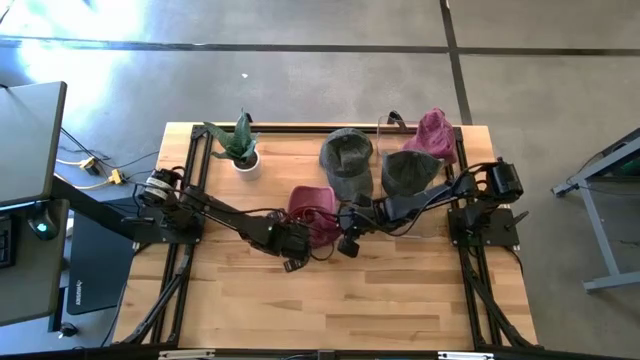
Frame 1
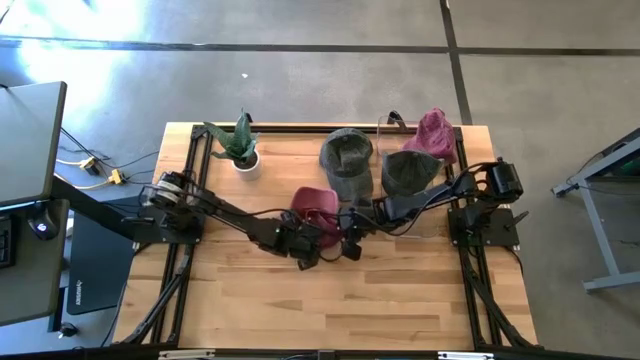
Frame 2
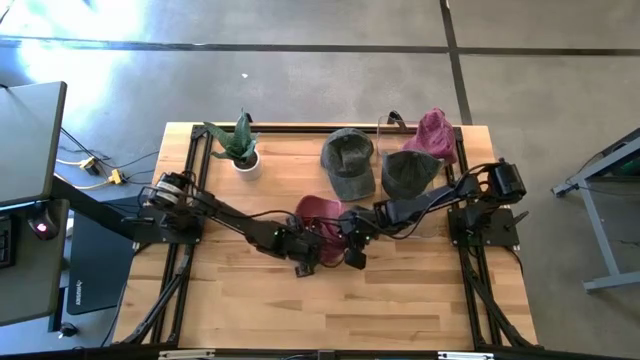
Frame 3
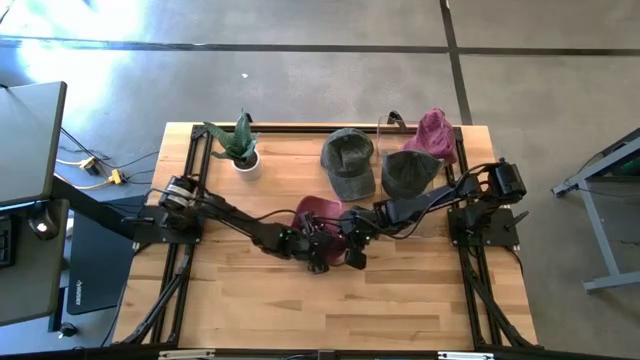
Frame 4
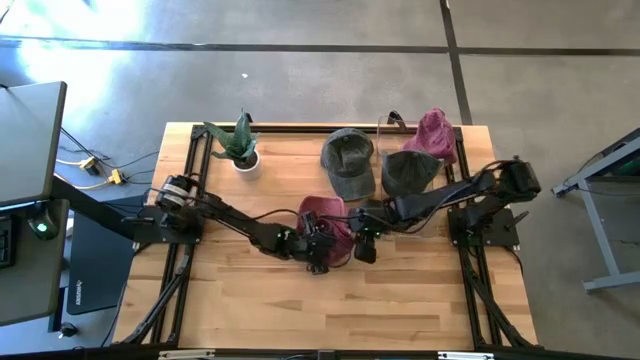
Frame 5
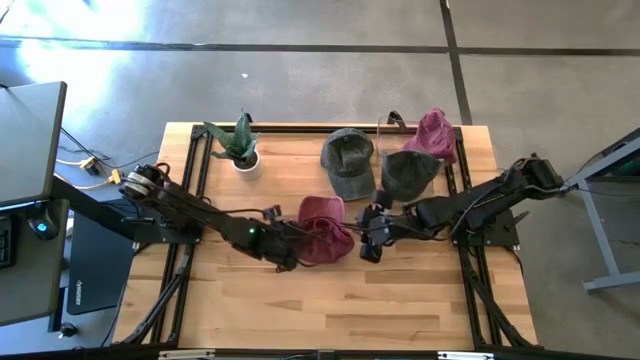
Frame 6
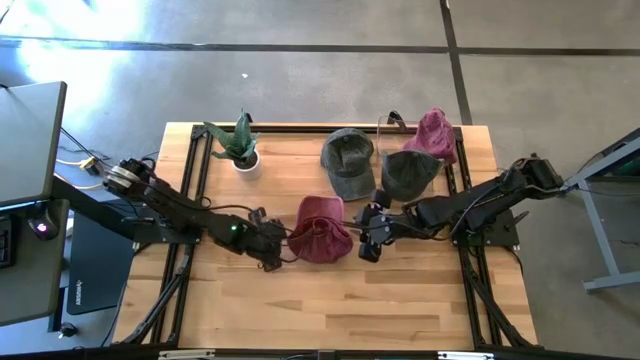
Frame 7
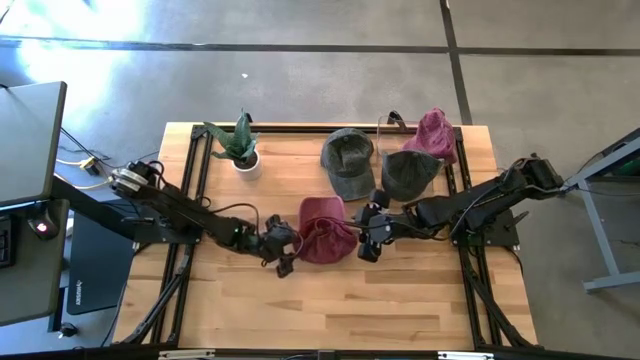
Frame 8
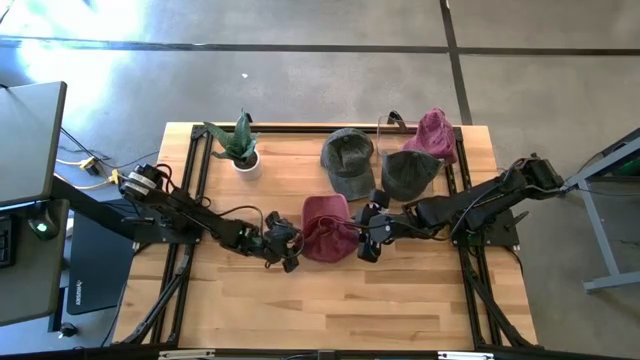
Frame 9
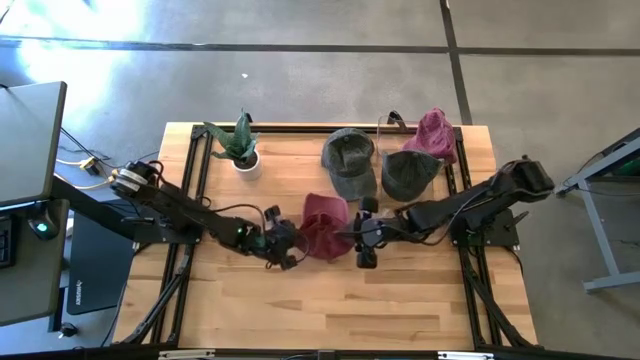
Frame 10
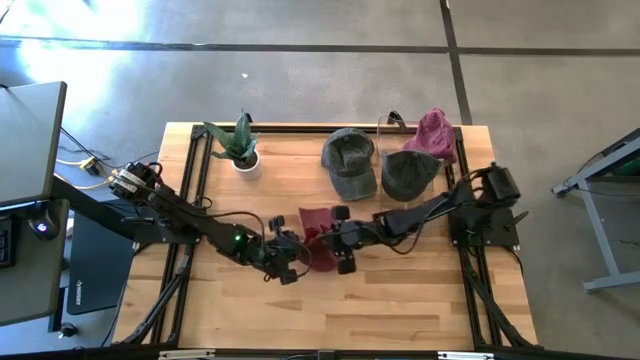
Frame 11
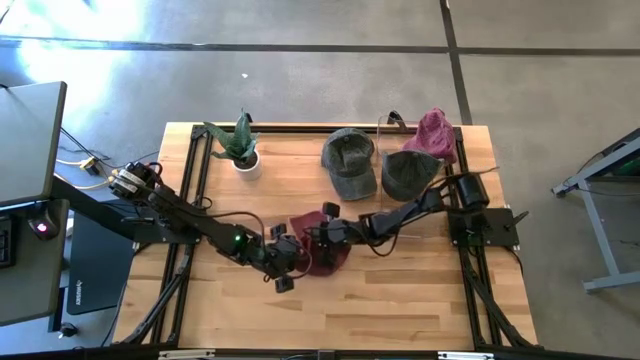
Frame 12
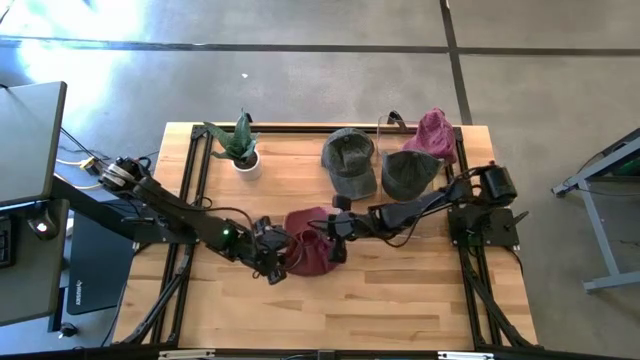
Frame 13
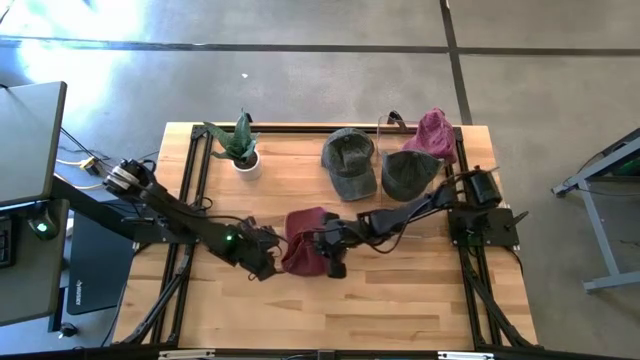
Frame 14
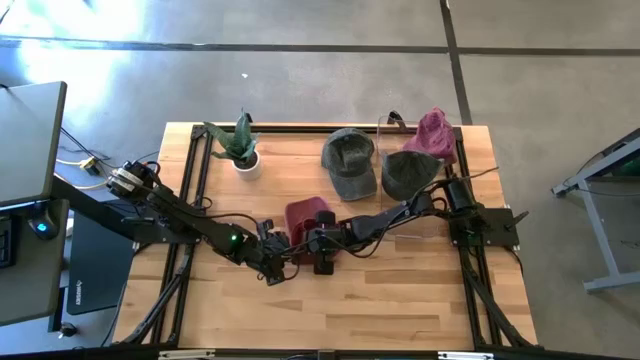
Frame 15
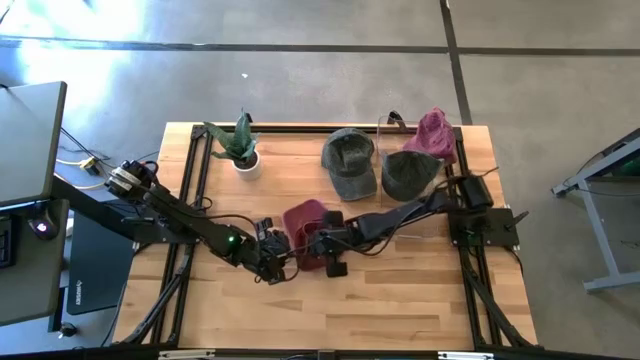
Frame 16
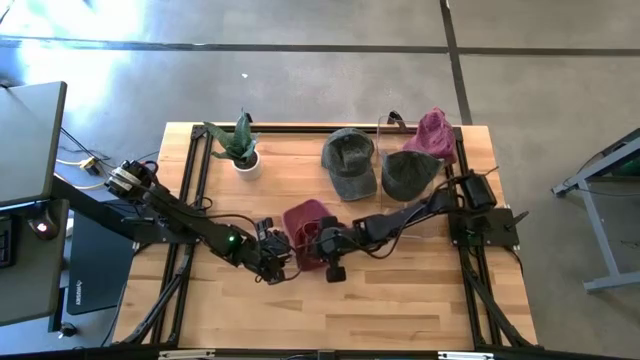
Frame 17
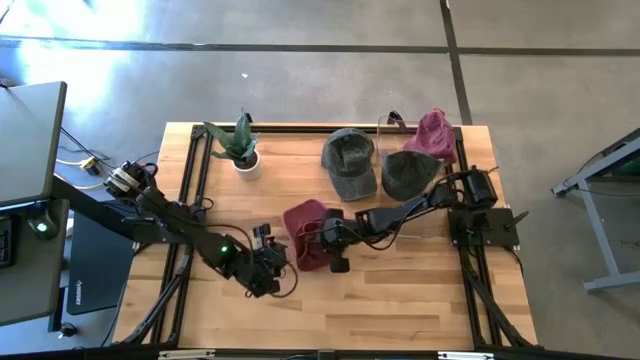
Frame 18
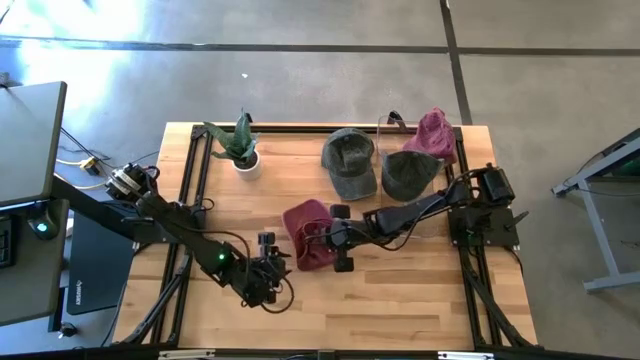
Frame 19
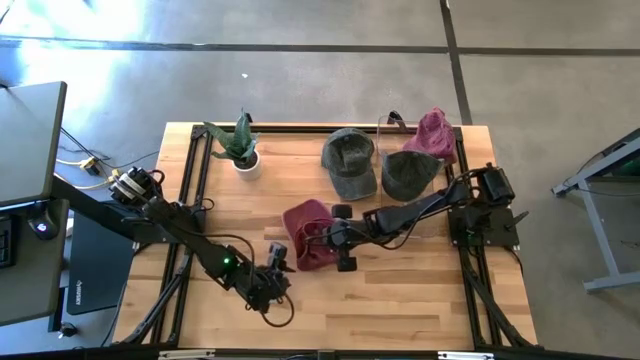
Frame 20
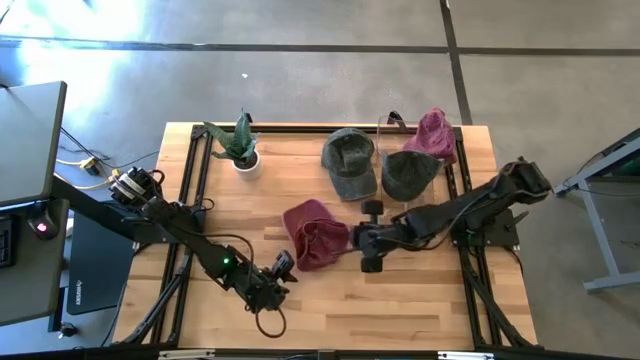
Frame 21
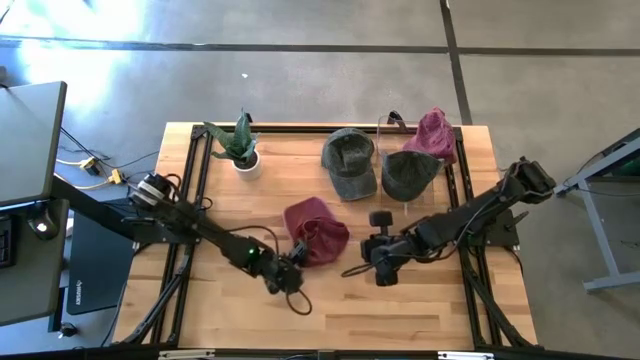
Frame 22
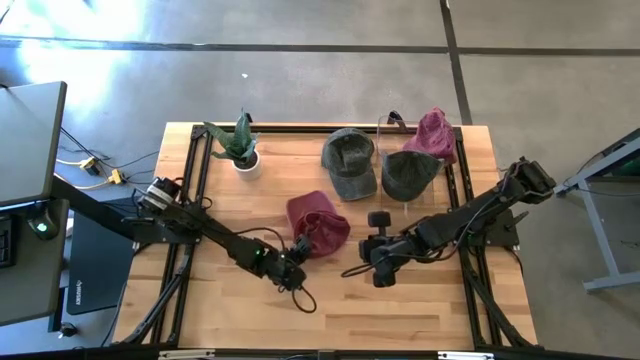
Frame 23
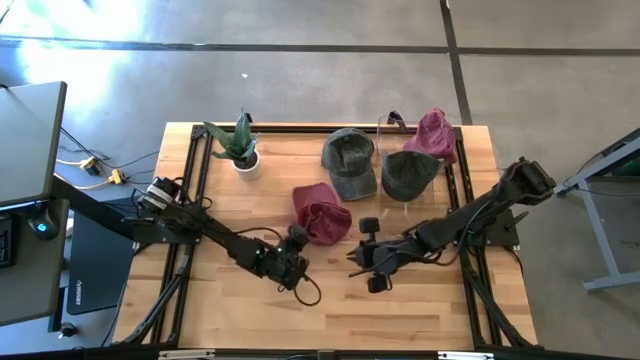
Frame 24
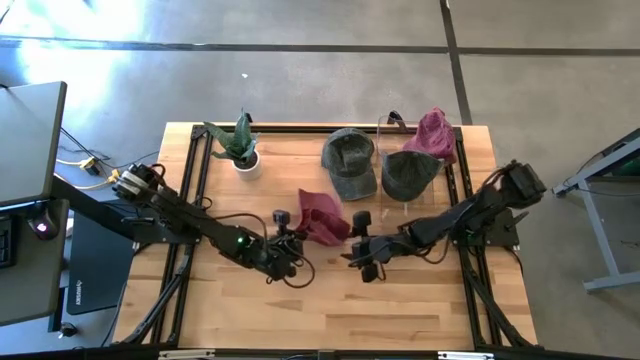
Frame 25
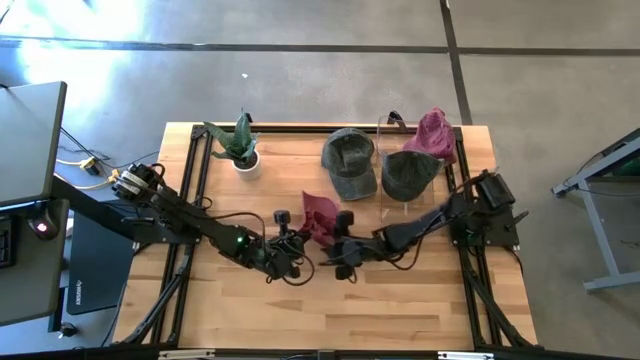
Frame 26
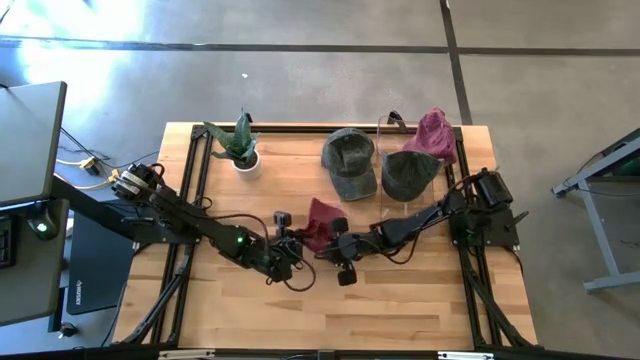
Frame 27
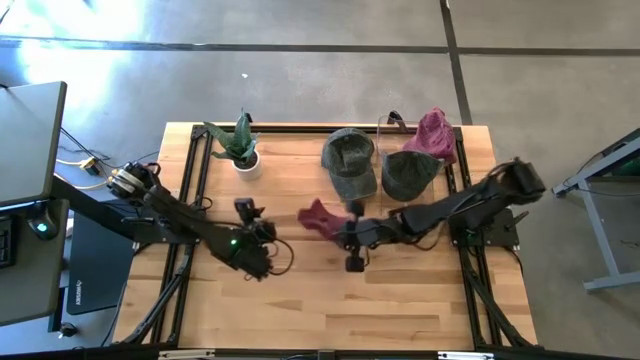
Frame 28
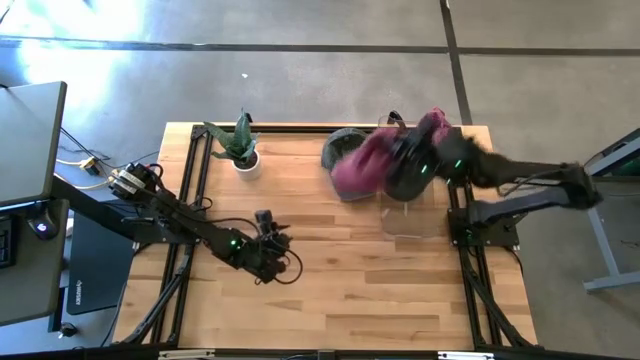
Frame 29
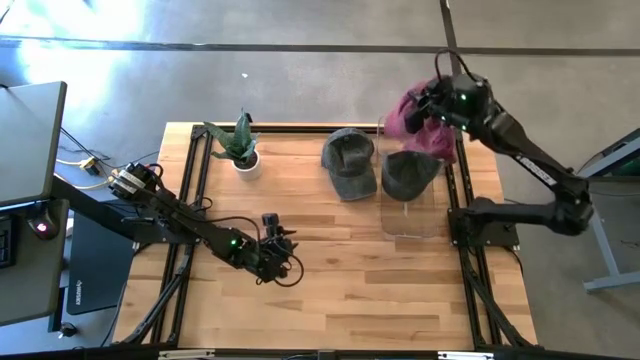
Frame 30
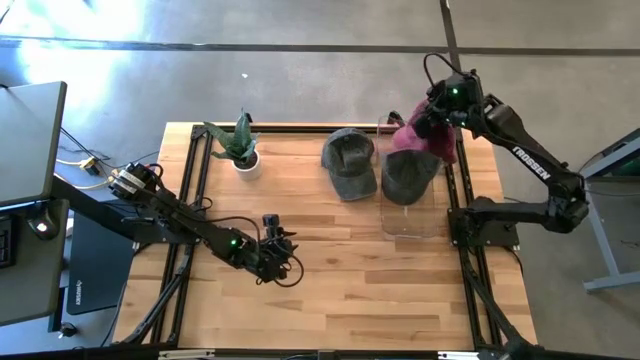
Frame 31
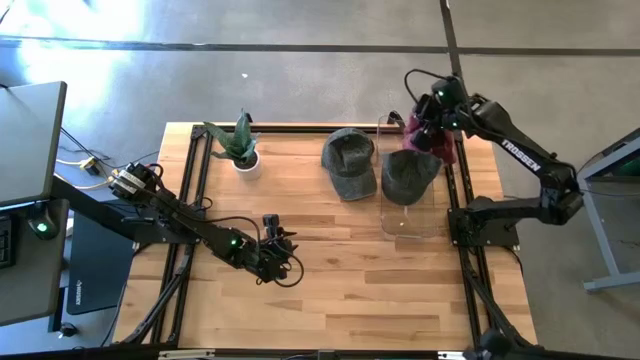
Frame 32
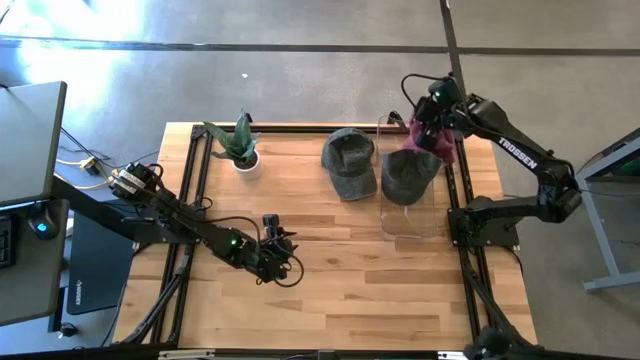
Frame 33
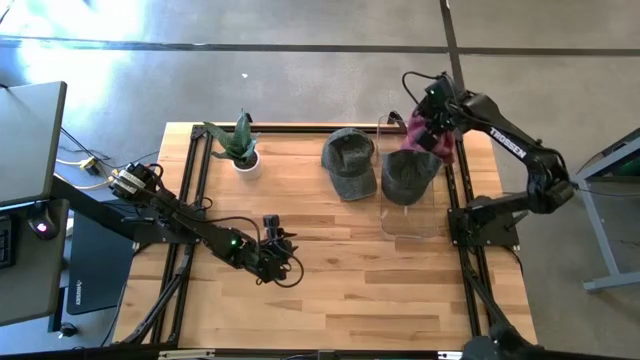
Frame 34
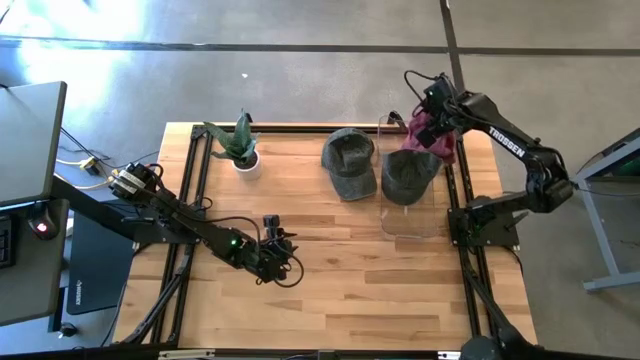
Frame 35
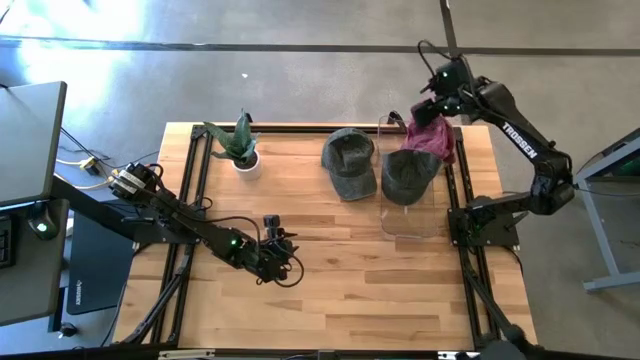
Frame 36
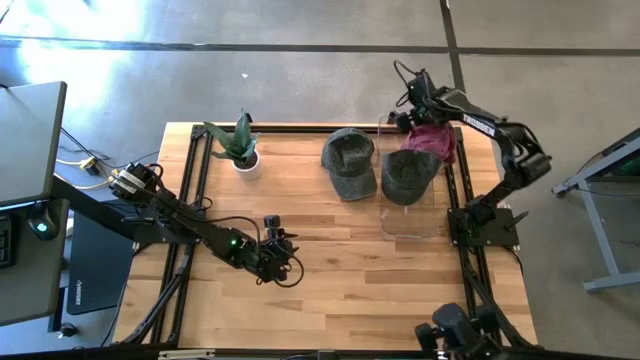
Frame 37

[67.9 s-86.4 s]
Task: Pick & Place hat
Put the red cap into the top transparent bin

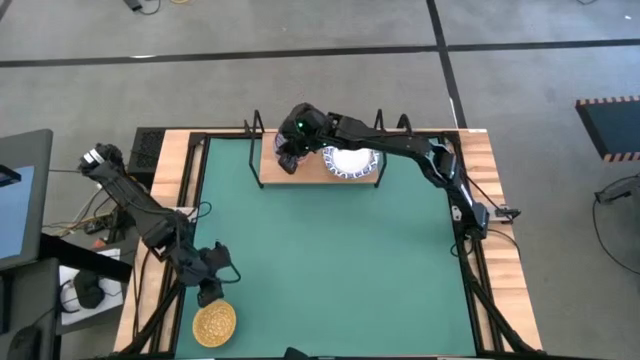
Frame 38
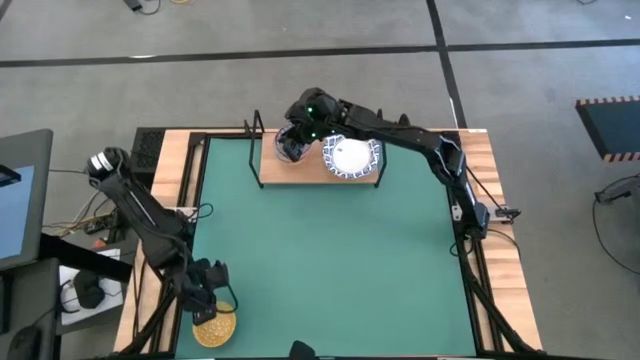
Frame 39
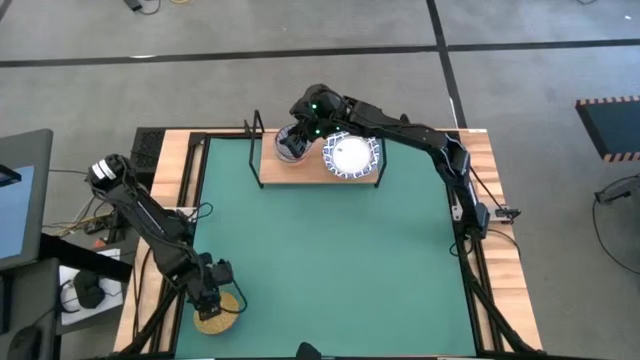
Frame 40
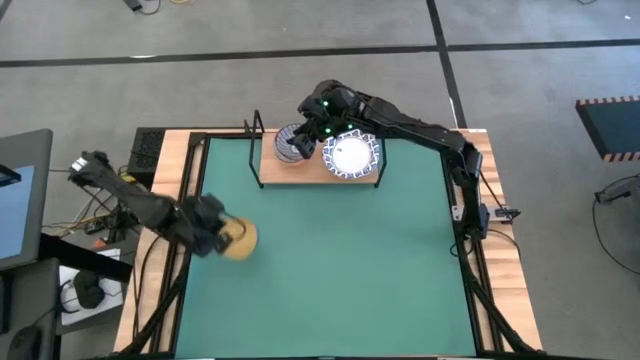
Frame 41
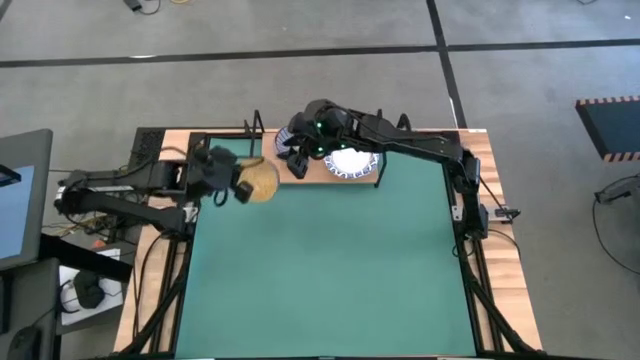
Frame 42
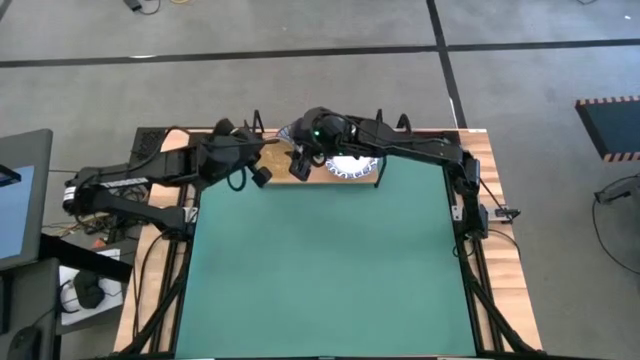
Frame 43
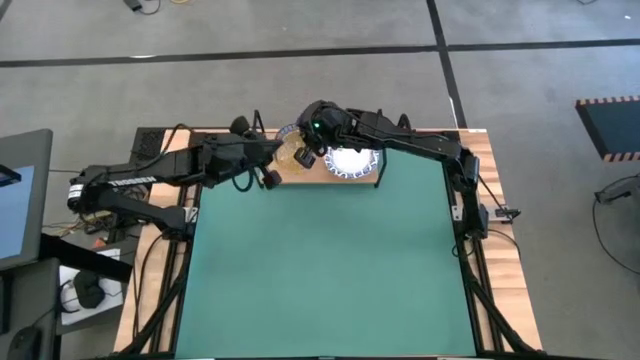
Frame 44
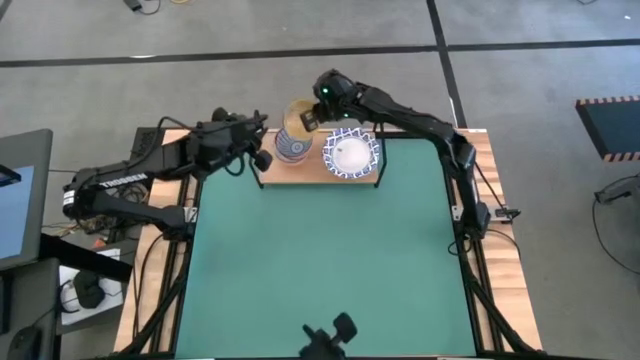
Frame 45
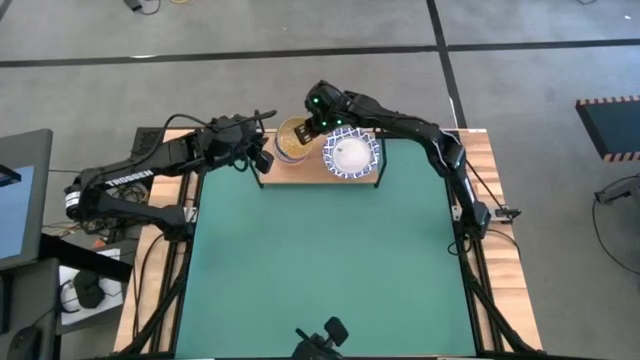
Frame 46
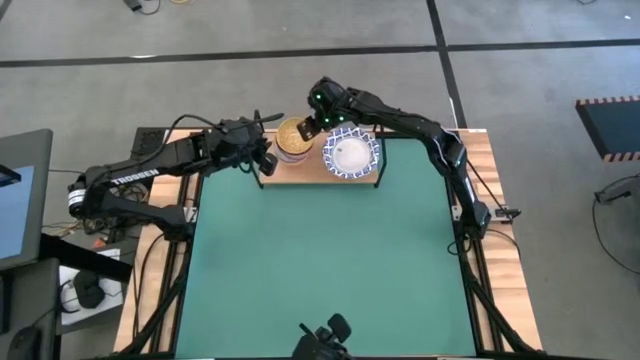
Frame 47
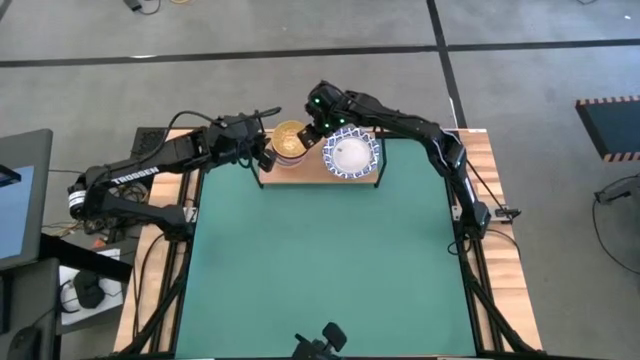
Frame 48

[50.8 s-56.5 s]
Task: Place and stack bowls onto a shelf
Stack the yellow bowl on top of the blue patterned bowl on the shelf
